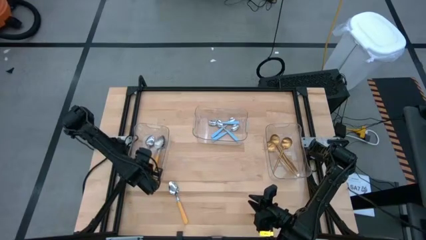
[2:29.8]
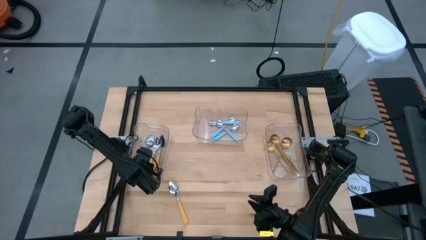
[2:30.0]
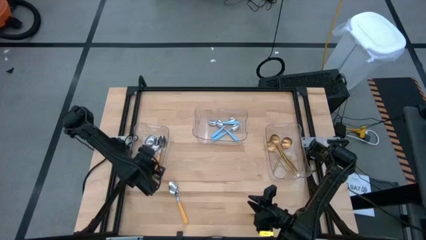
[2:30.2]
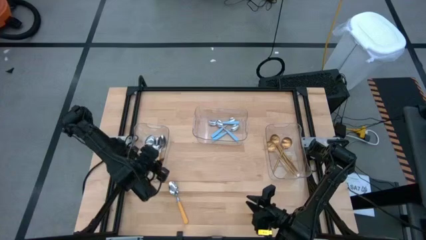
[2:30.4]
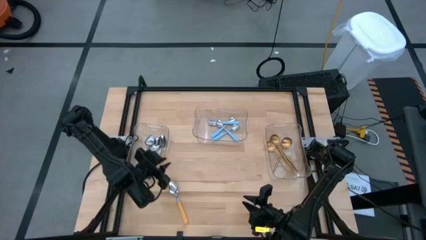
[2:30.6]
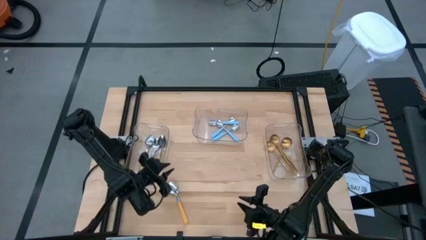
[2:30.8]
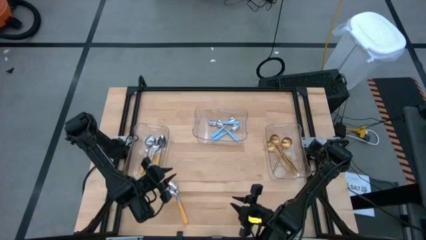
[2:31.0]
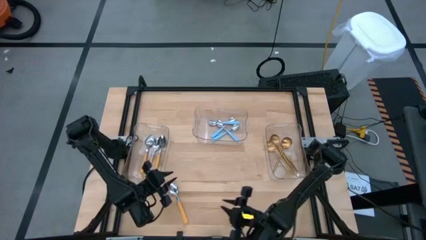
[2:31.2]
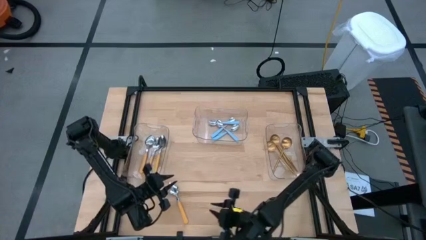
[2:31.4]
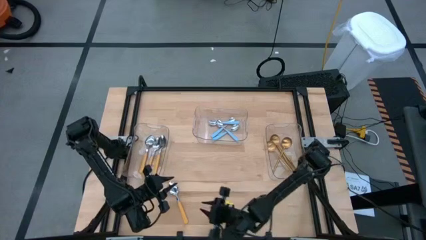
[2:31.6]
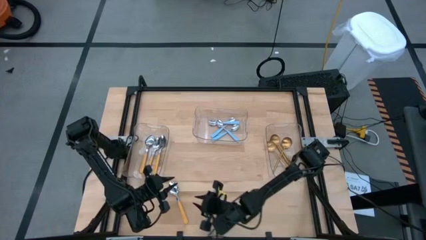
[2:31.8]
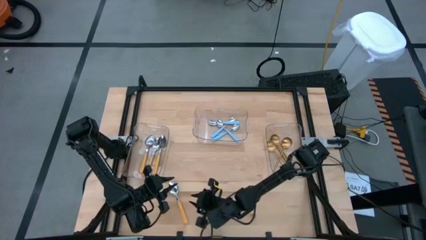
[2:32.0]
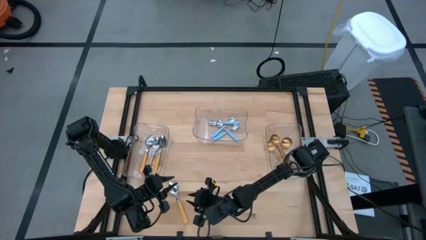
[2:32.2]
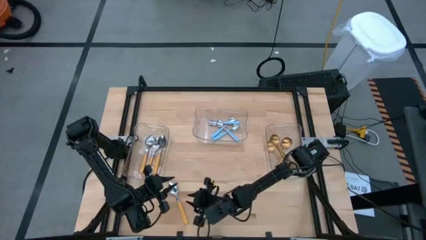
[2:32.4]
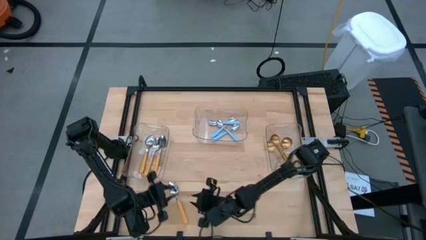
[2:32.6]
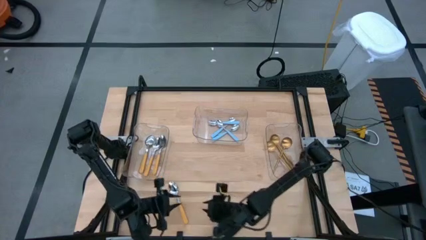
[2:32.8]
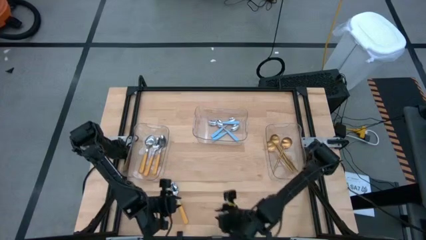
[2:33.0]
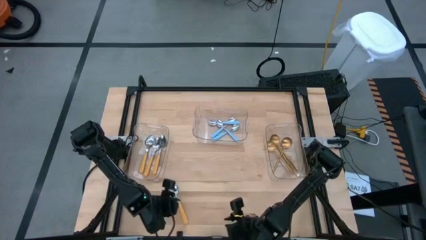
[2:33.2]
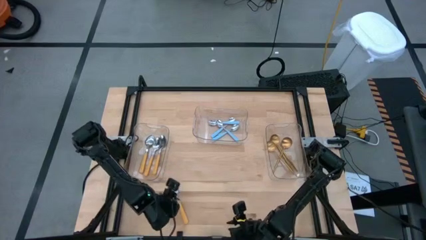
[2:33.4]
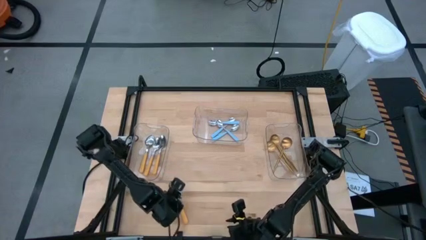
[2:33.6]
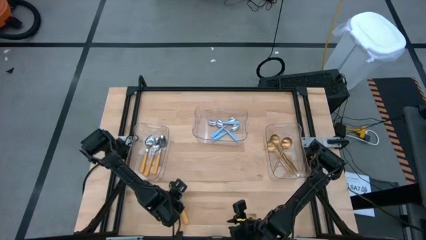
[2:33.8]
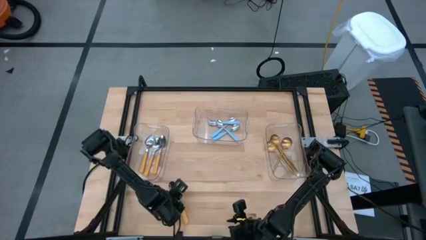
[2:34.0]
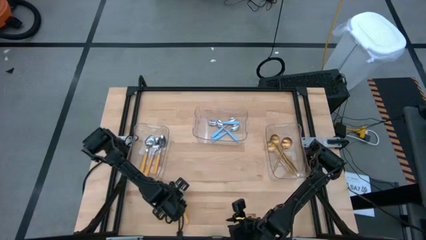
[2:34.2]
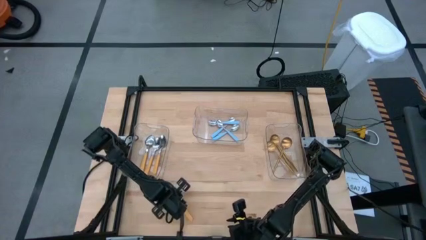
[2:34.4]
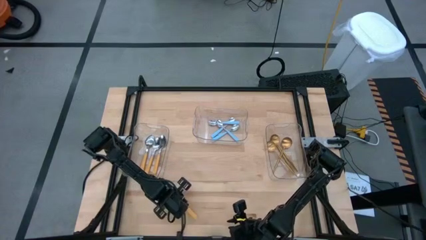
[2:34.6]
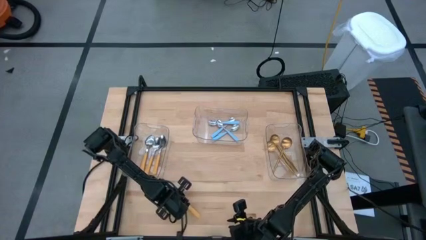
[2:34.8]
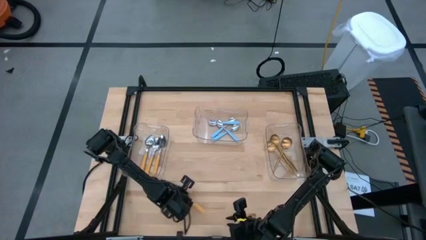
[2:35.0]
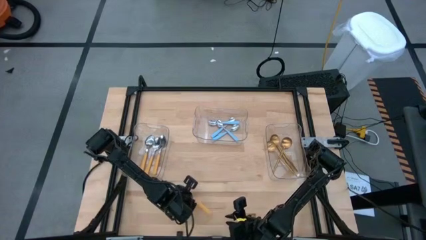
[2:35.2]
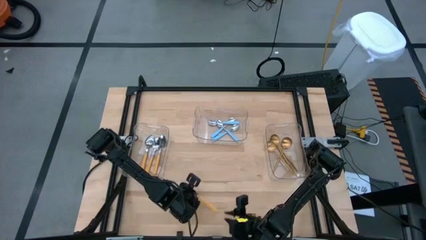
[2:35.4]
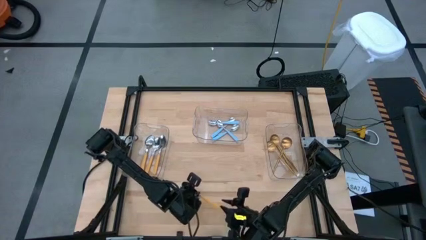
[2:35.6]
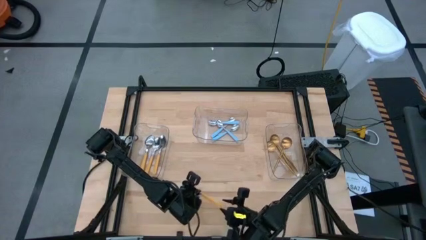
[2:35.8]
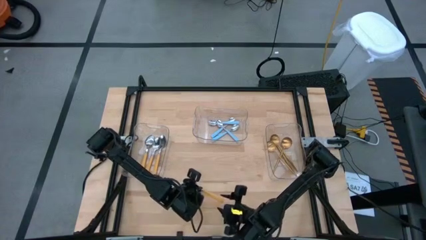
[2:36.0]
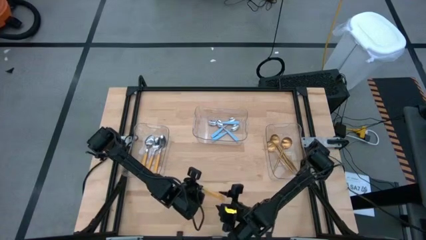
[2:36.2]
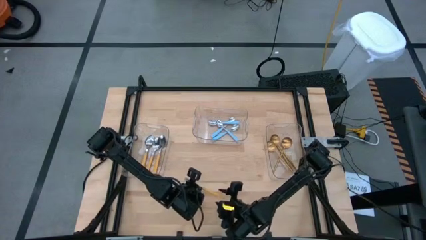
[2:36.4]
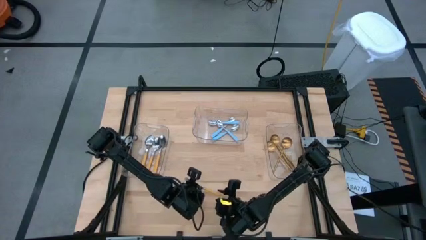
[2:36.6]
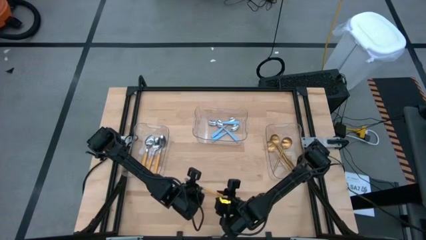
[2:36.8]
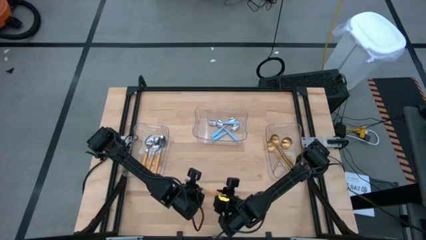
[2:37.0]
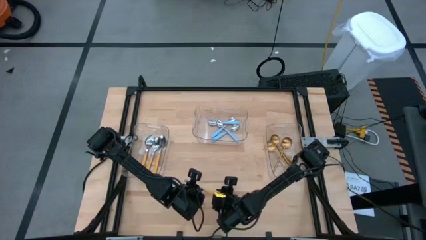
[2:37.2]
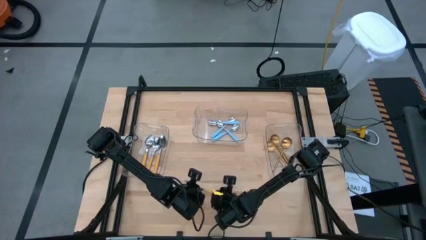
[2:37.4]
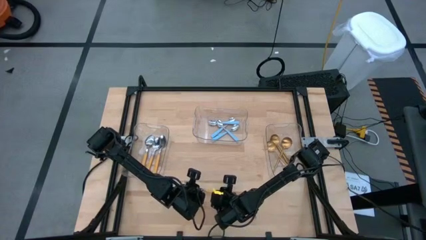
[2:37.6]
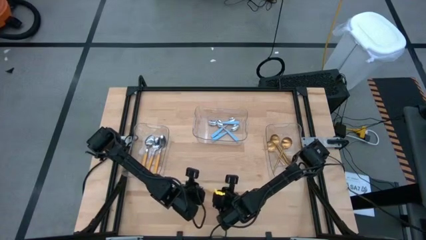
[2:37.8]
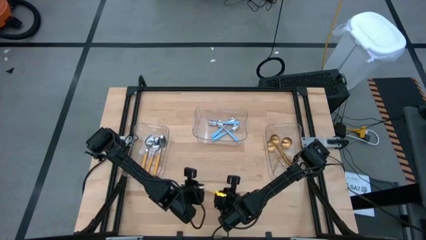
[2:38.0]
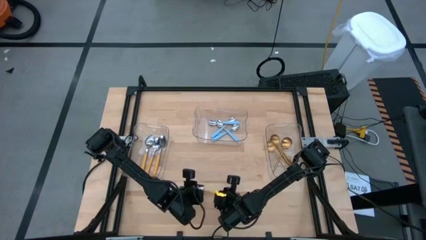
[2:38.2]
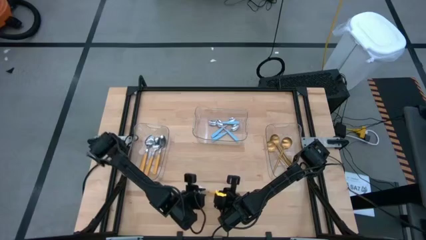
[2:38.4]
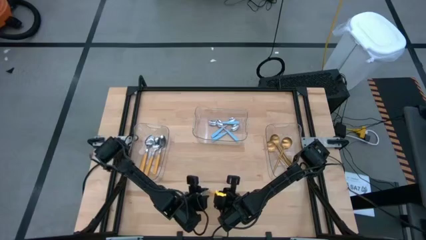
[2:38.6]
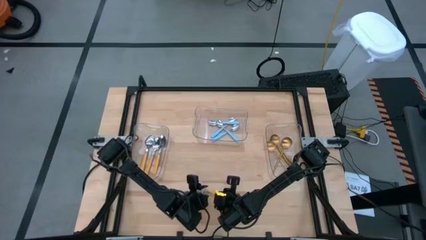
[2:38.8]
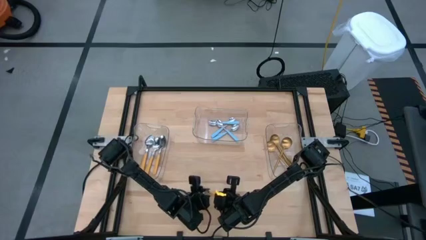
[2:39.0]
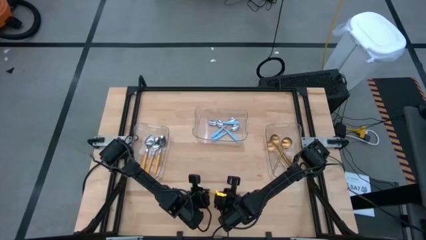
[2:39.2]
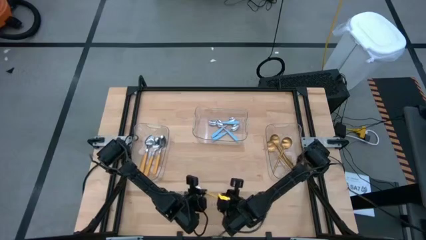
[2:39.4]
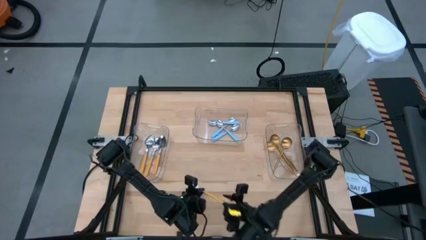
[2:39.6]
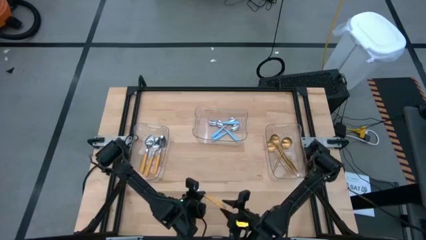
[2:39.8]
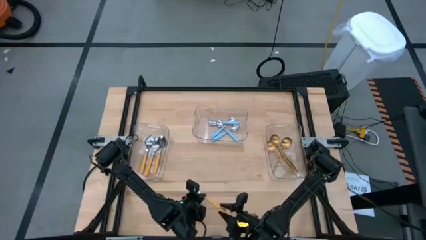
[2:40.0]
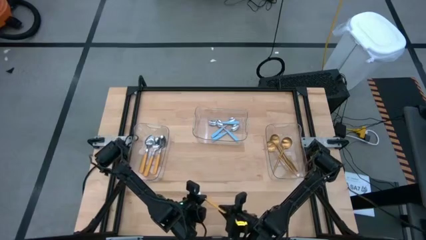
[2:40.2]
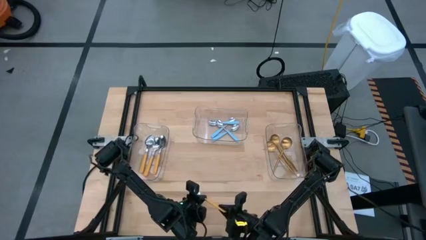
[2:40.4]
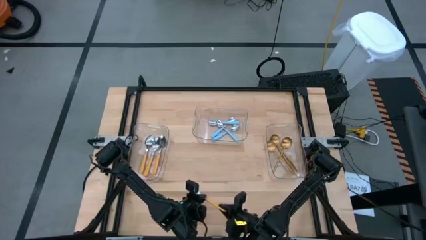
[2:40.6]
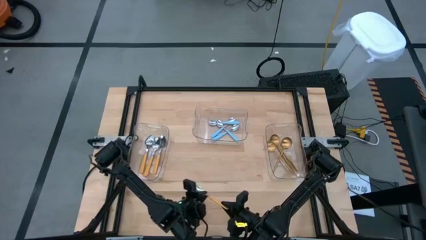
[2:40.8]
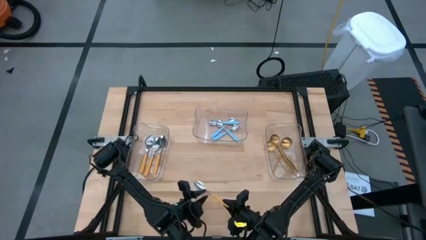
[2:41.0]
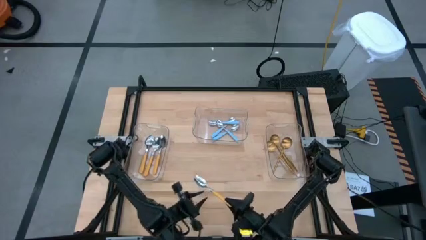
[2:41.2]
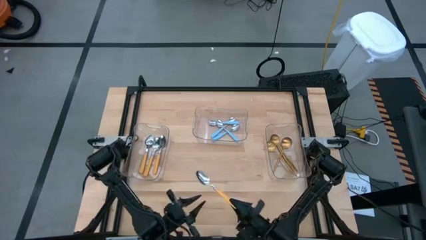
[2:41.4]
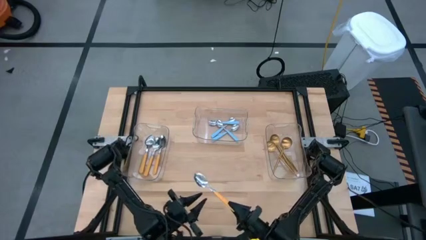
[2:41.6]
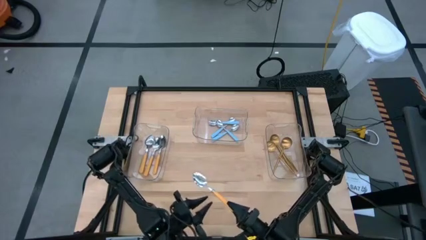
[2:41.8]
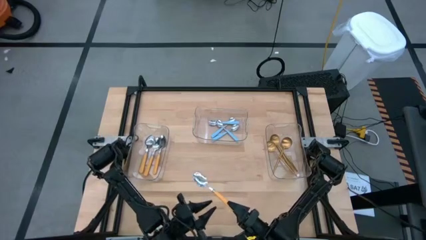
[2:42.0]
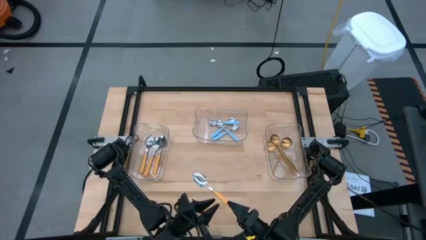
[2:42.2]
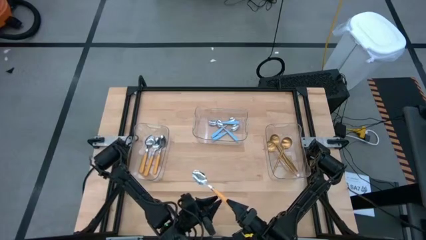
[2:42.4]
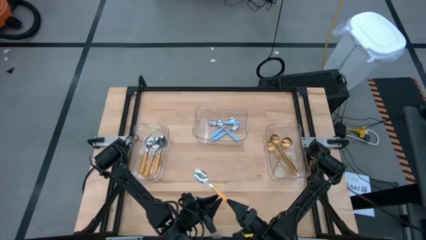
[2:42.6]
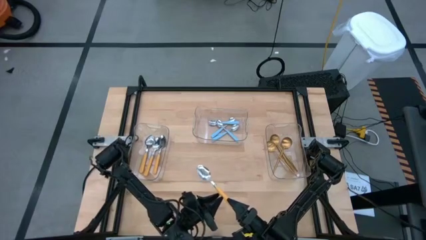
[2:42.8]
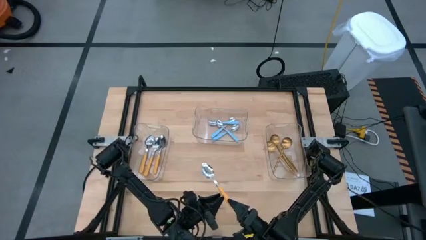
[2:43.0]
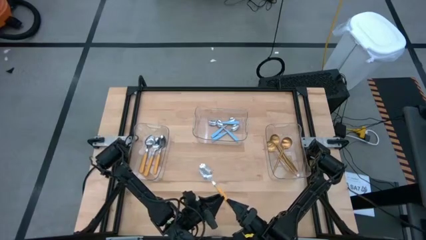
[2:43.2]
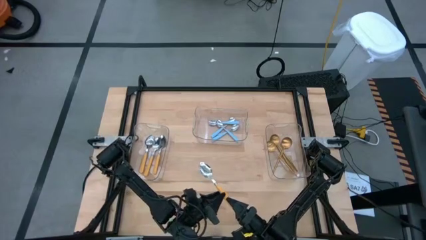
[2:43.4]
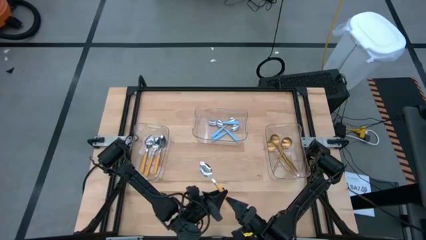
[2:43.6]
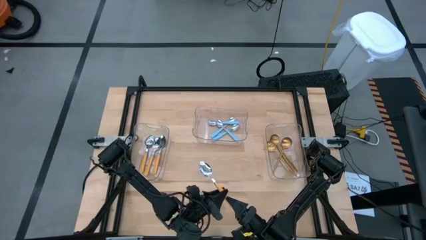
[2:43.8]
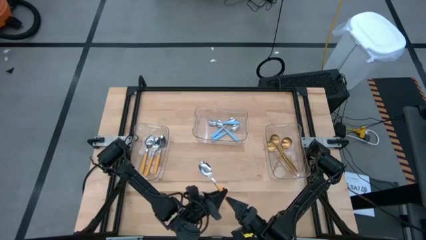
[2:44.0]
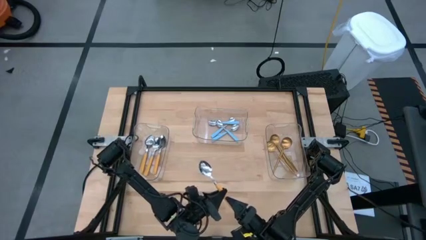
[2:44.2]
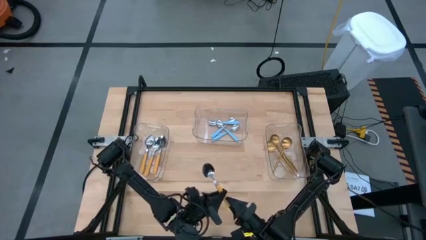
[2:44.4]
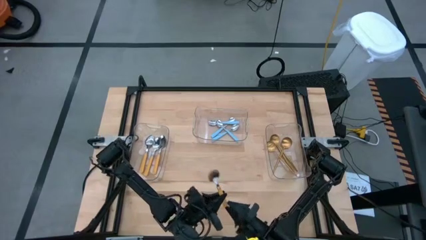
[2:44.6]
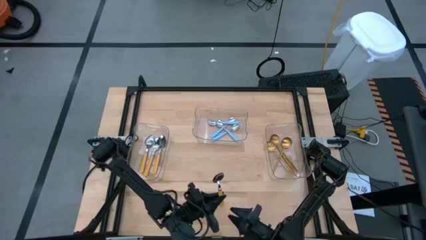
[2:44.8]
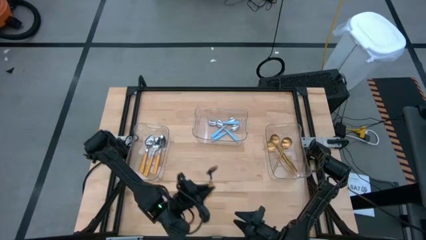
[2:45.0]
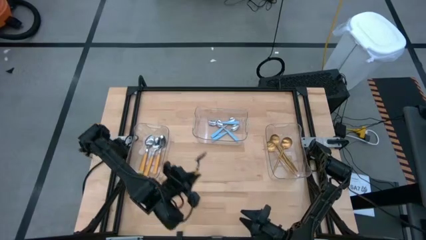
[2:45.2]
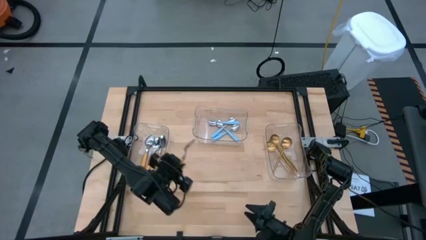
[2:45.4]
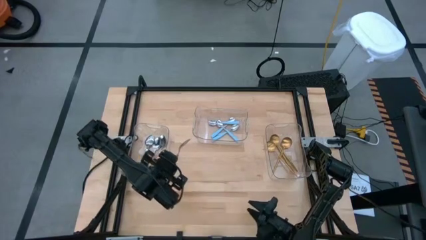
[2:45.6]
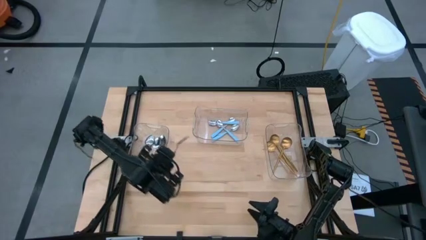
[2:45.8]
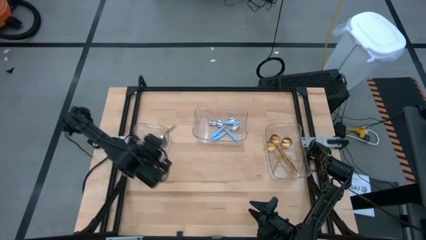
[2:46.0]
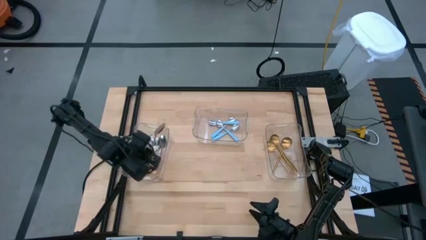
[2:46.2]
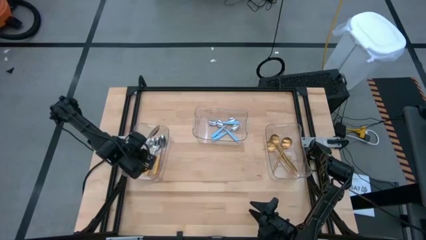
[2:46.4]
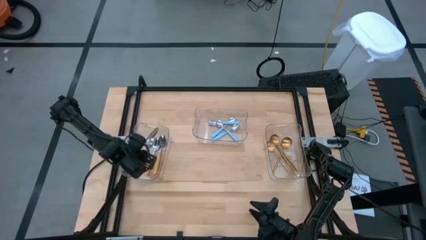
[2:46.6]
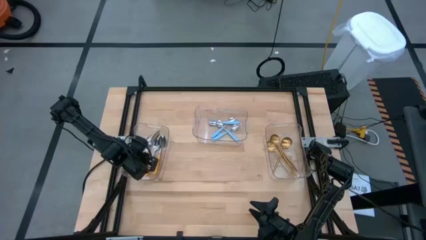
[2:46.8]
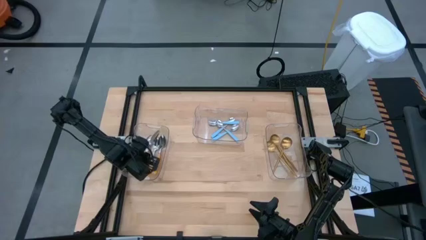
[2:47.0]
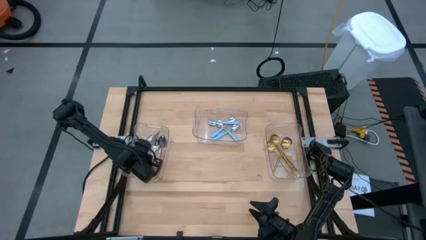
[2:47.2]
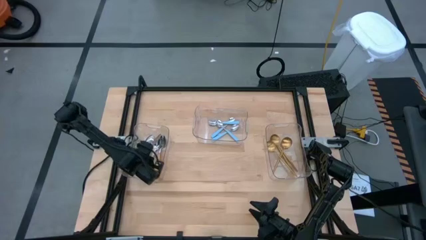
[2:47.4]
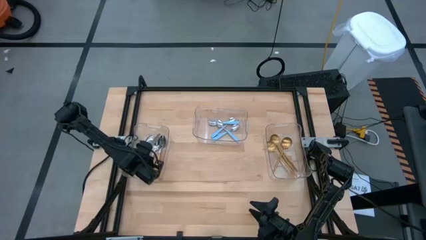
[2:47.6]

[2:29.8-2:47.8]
Task: Sort silverware by color (type)
Put the yellow spoon into the left transparent bin
